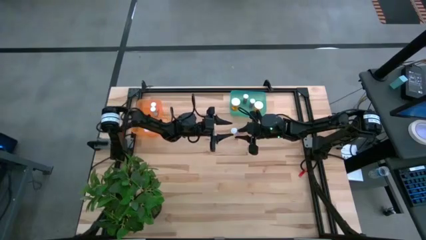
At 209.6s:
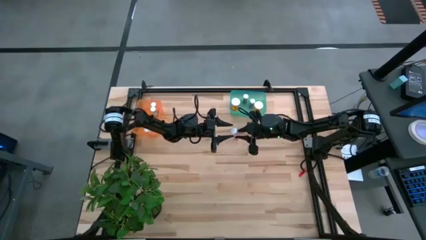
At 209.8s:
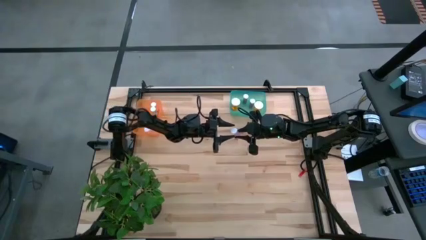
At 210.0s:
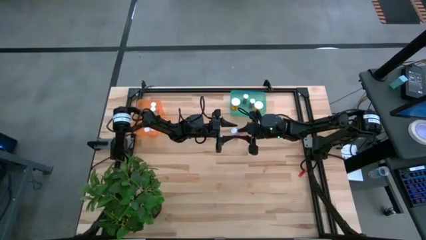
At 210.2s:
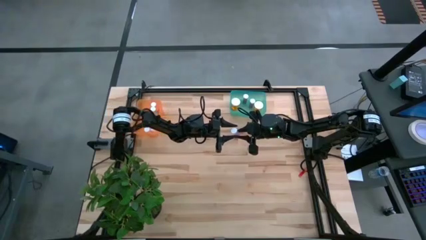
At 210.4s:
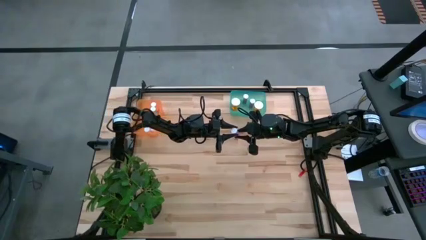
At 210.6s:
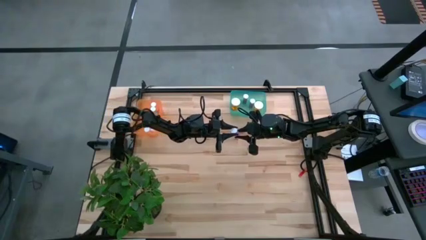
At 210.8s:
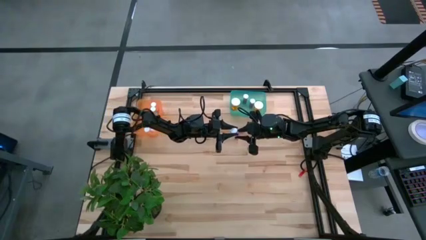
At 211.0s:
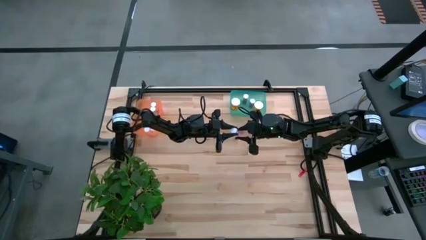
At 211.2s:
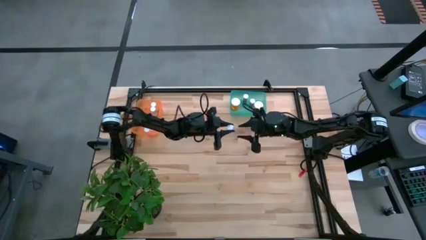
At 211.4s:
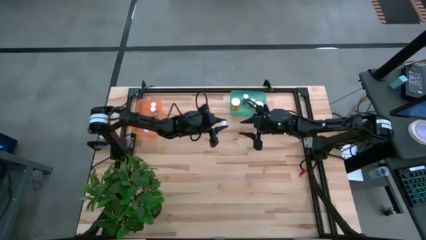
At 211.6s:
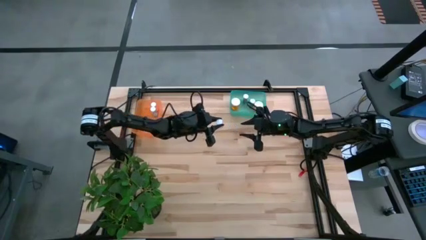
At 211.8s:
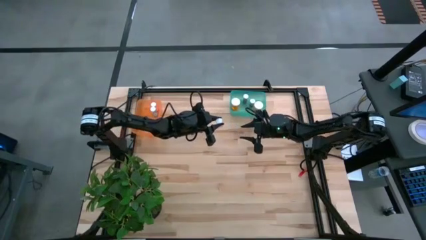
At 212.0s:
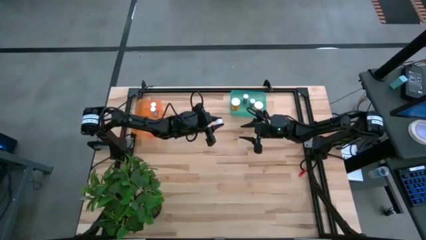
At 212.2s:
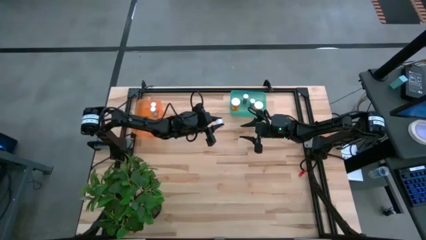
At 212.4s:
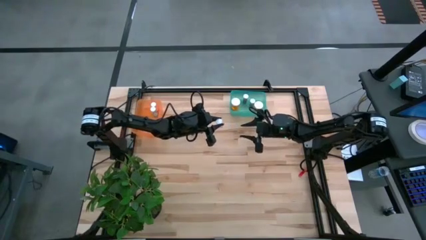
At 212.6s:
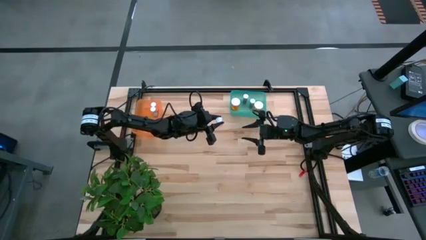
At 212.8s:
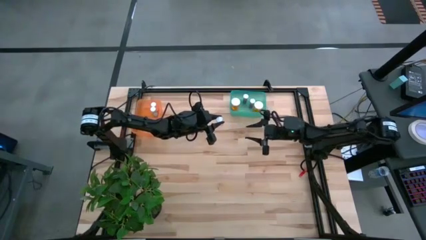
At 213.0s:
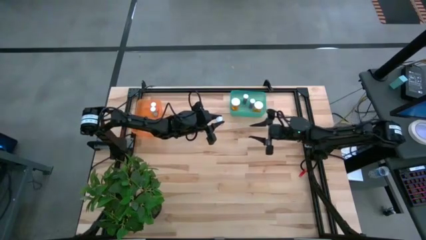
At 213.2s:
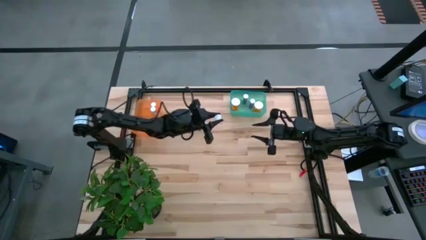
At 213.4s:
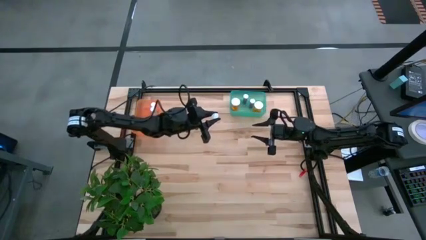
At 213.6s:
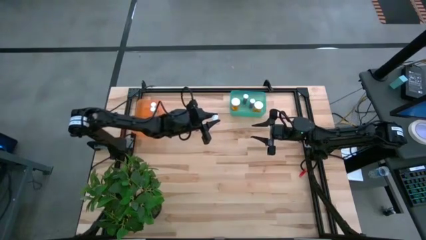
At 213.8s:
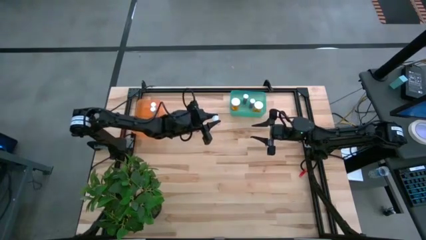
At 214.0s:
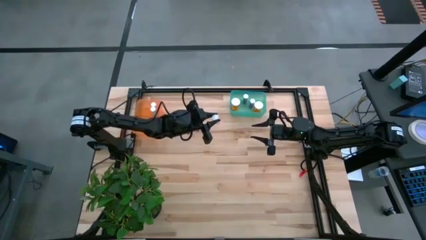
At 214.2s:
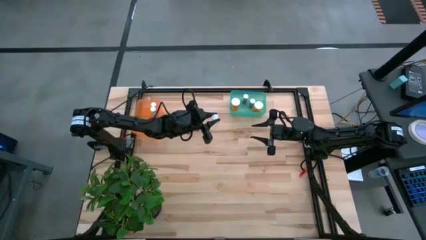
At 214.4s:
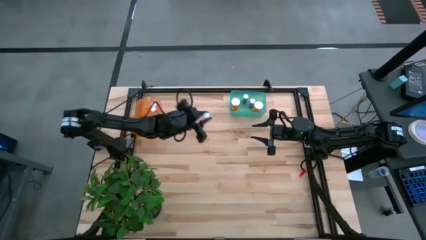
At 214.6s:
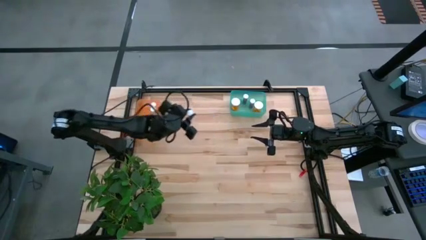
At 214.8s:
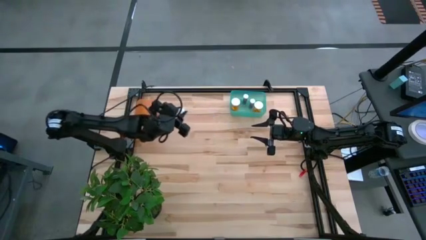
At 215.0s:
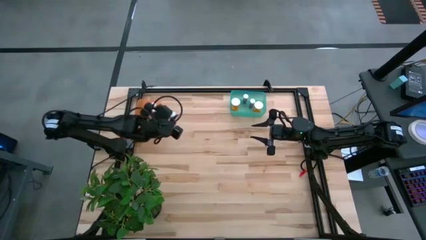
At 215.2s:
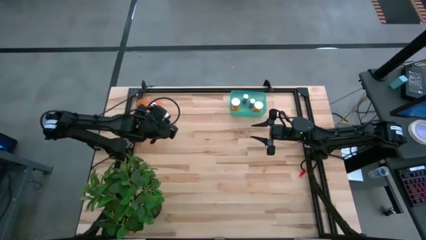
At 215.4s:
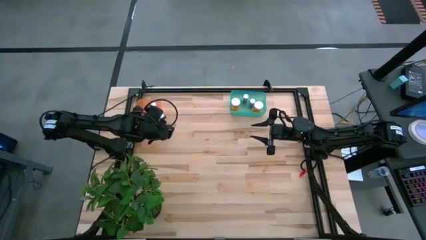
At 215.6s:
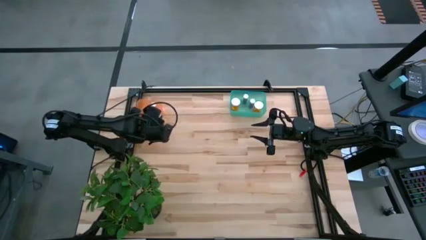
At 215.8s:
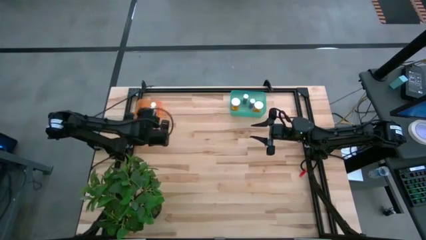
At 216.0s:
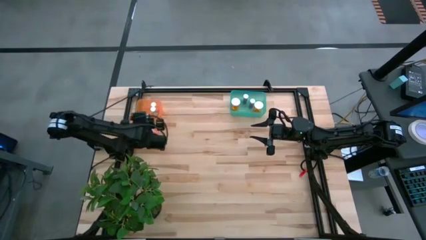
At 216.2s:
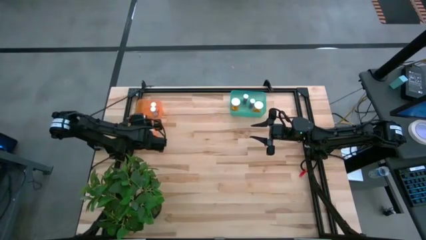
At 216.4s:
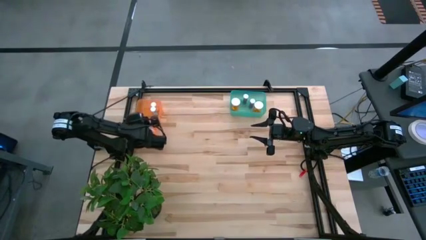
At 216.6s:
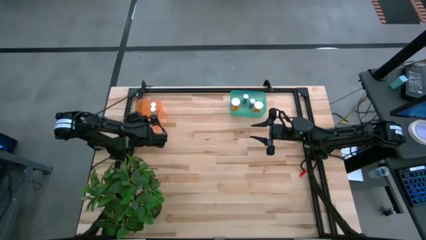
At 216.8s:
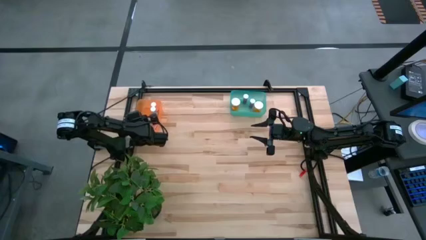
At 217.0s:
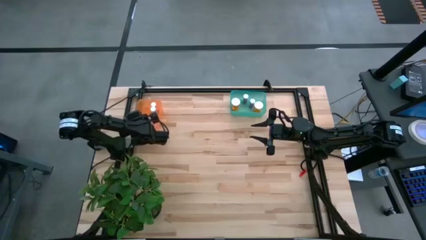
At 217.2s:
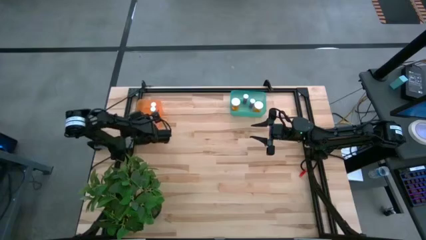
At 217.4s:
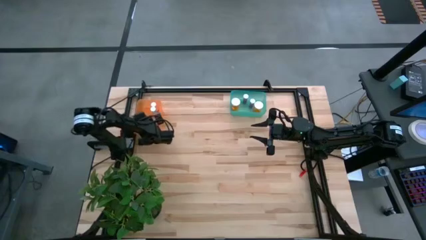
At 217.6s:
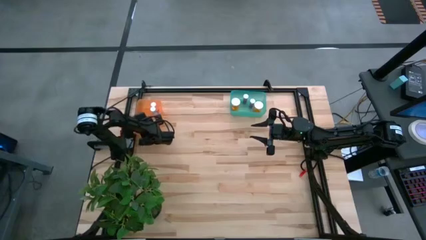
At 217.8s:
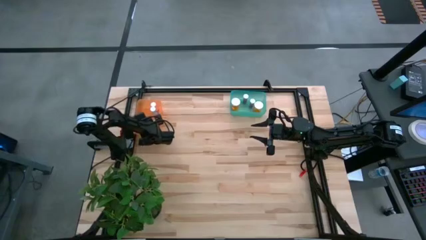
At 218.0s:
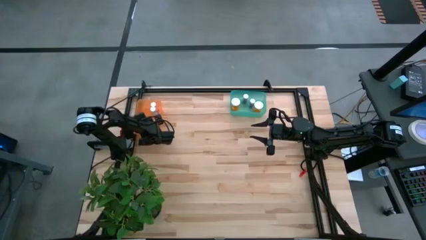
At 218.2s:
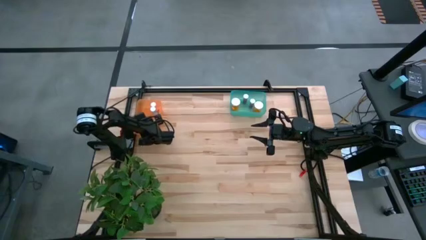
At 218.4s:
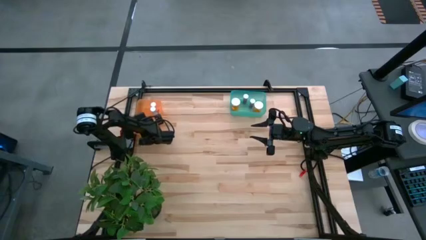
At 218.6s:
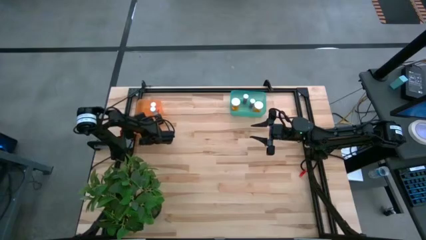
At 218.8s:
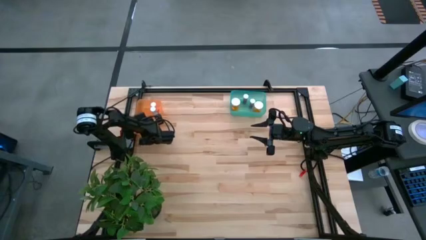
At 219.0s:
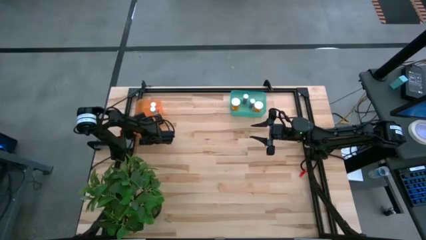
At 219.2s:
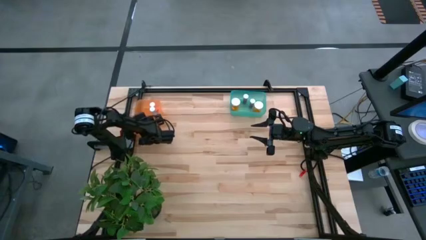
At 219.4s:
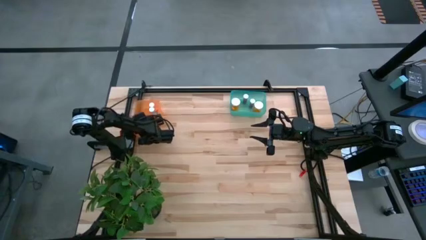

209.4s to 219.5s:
Task: Pick and place medicine bottles into bin by pill shape (circle, oval)
Adjust the pink tablet bottle in the orange bin

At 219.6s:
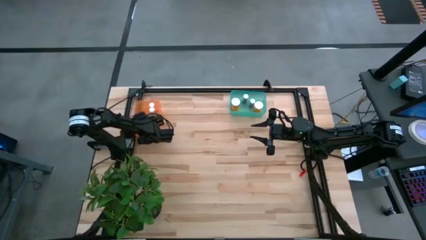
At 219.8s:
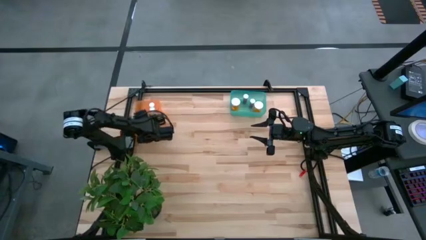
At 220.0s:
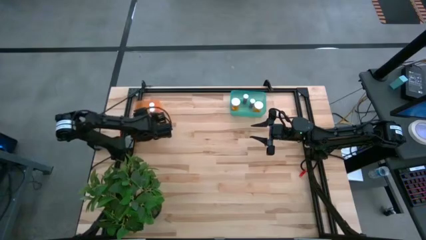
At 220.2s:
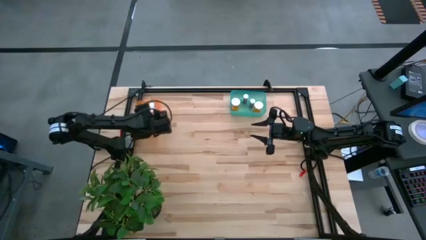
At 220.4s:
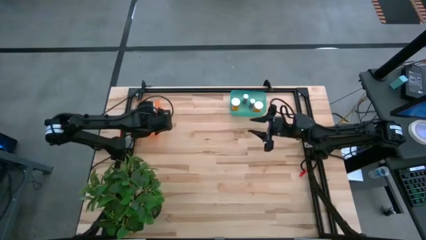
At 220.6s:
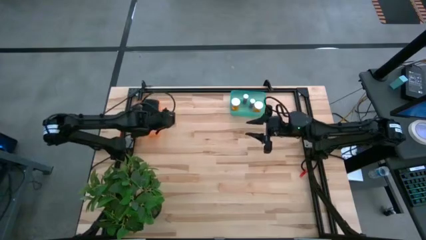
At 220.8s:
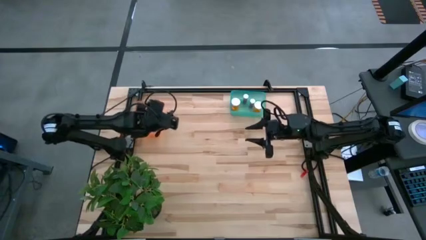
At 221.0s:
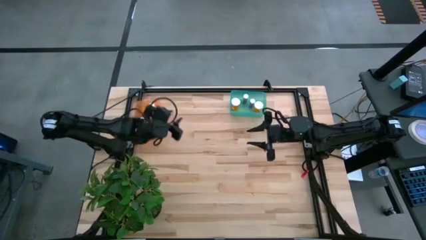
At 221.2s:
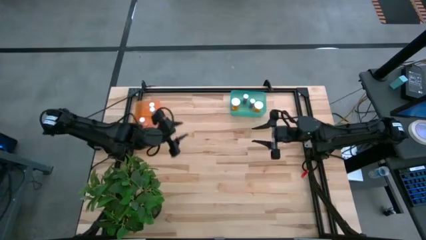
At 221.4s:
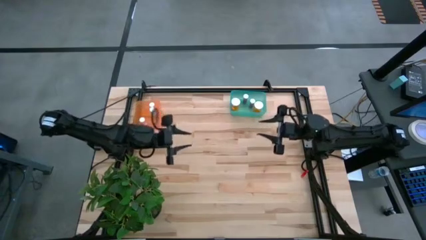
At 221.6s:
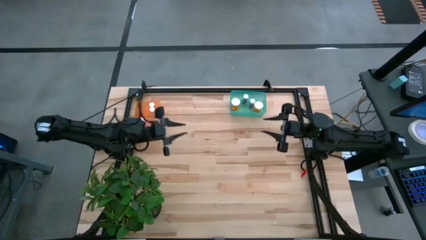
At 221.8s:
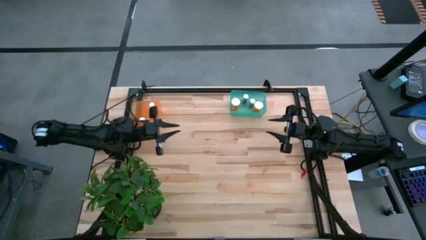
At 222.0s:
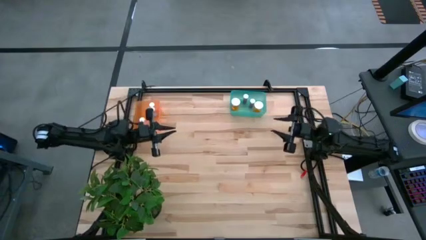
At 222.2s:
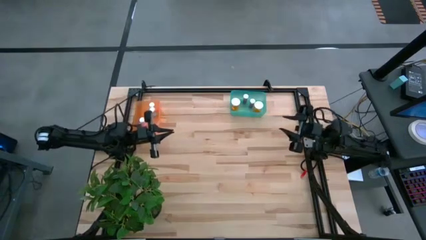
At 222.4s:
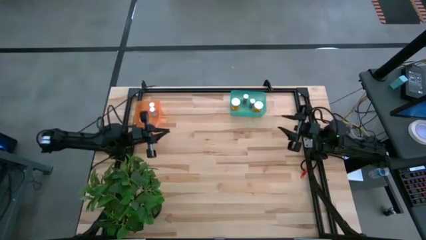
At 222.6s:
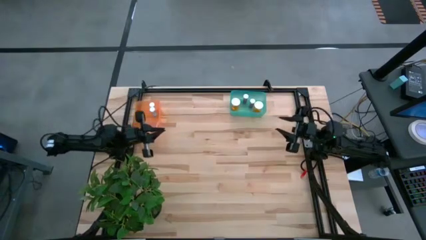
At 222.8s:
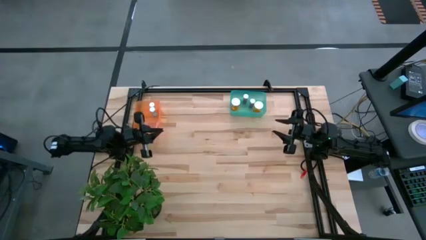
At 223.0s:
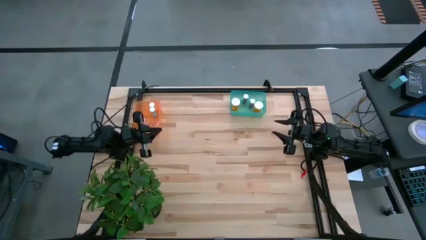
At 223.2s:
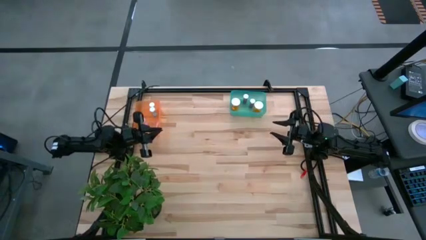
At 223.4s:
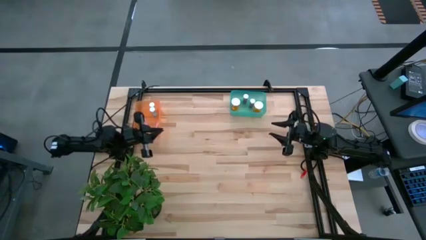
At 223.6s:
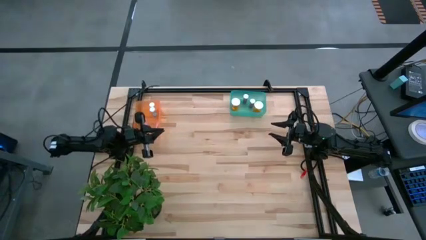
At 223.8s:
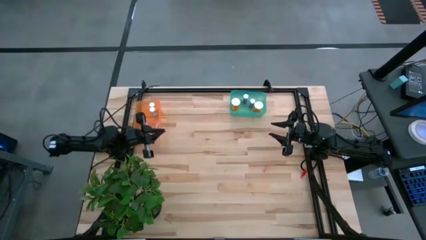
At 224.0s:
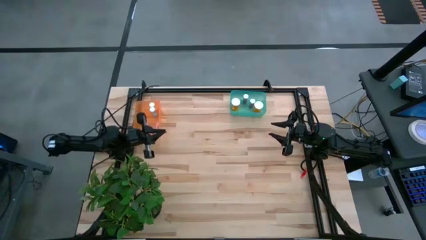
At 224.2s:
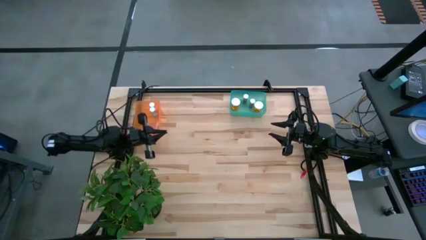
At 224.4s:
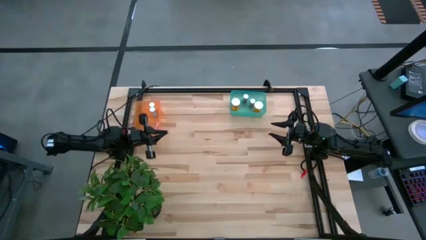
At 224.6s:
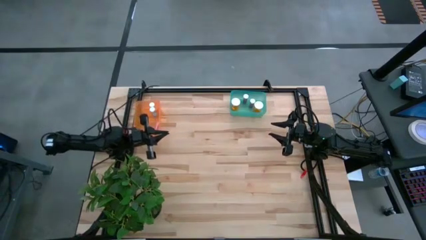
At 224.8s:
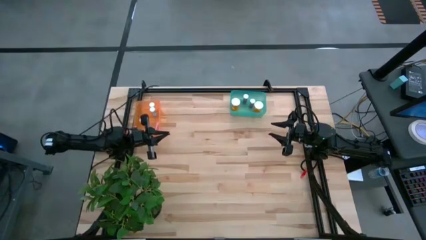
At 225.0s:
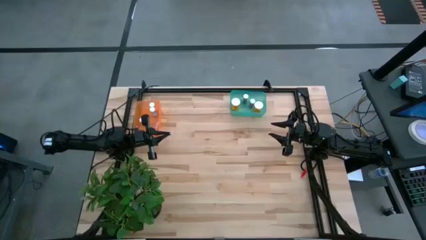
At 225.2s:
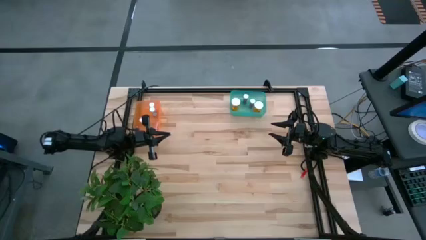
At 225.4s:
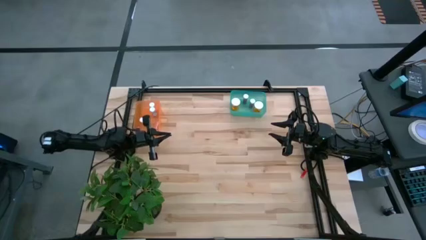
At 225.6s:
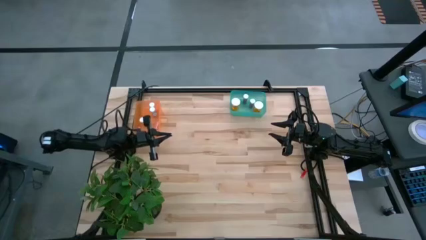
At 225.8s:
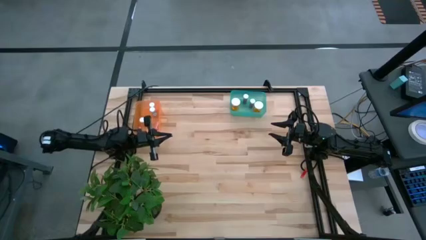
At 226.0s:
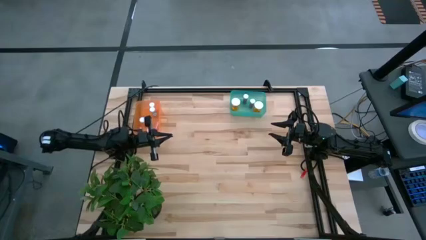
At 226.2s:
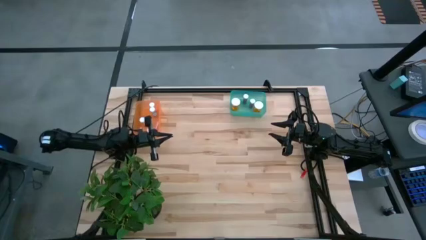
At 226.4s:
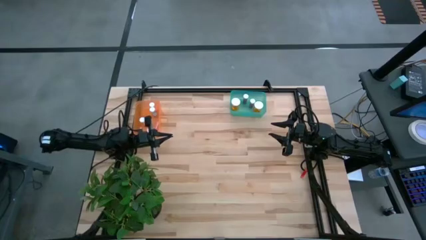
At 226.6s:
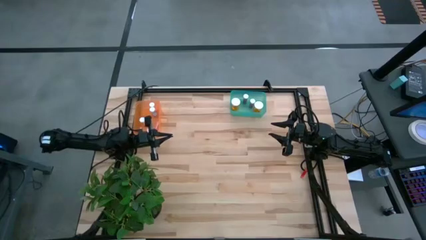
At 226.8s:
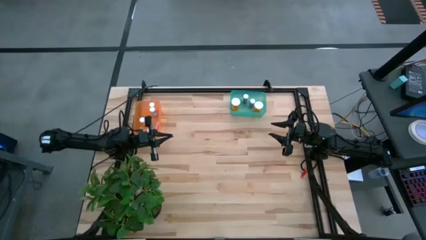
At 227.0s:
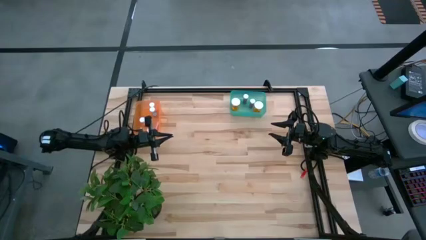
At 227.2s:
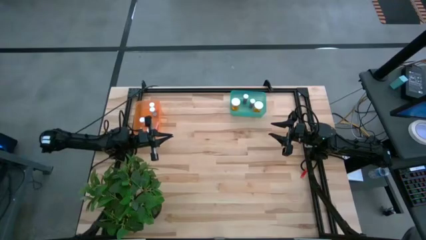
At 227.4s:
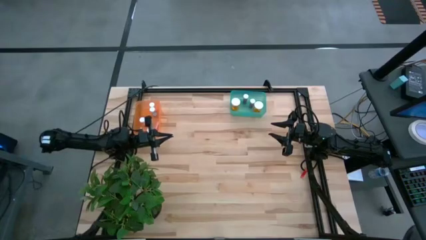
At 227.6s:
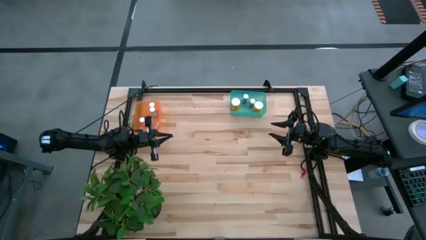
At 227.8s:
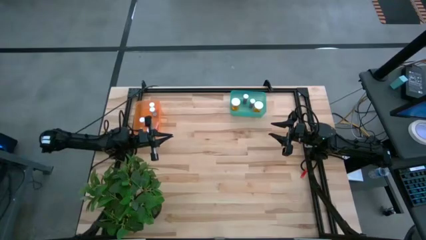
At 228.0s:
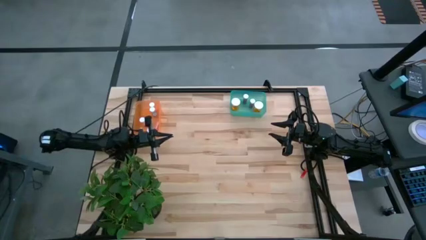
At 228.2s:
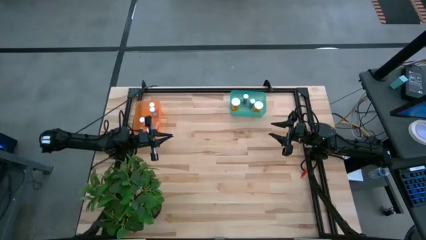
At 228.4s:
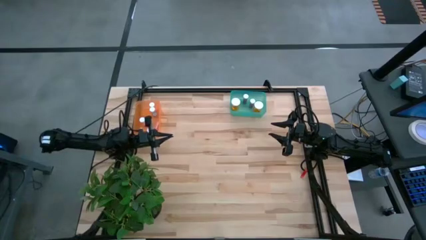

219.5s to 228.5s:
Return to Home Position
